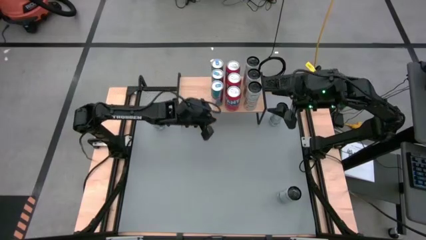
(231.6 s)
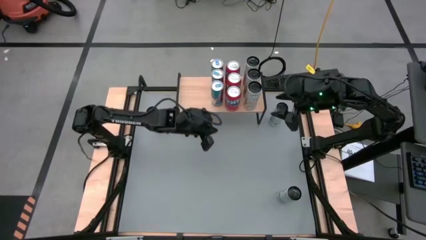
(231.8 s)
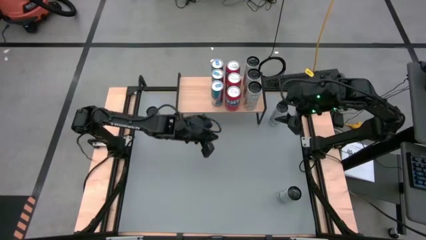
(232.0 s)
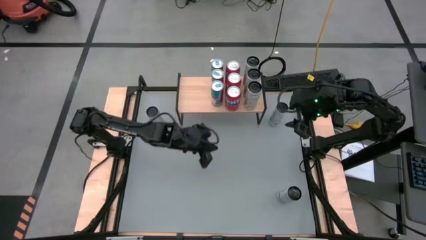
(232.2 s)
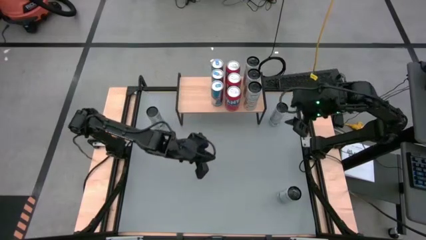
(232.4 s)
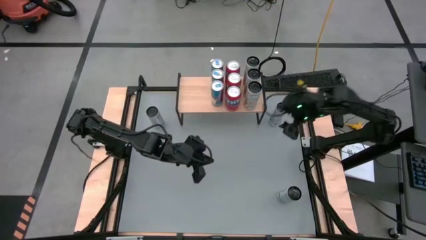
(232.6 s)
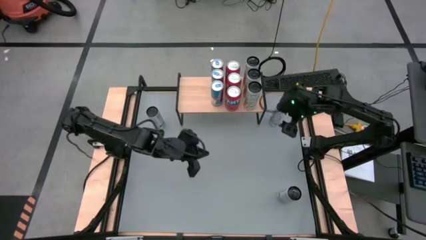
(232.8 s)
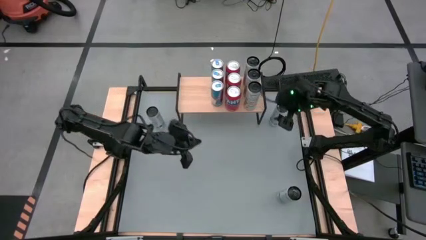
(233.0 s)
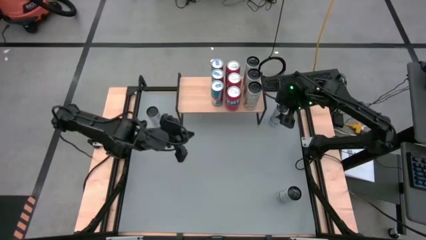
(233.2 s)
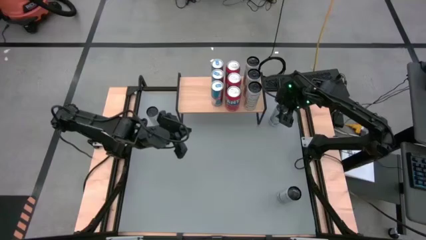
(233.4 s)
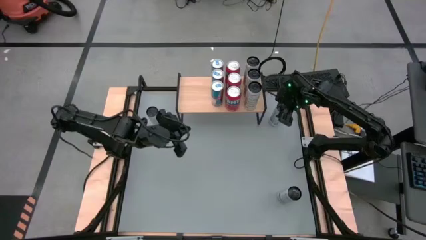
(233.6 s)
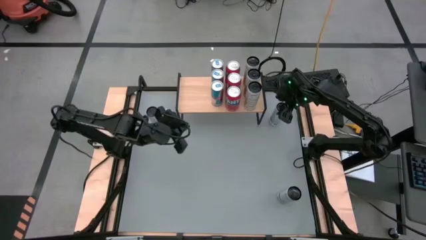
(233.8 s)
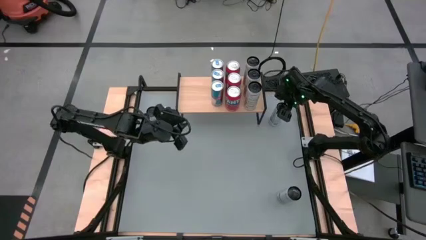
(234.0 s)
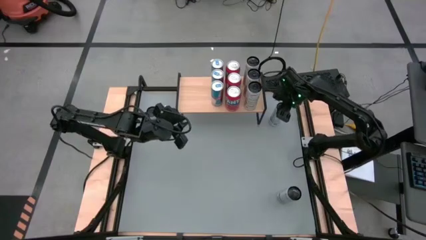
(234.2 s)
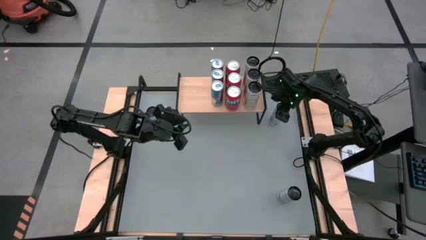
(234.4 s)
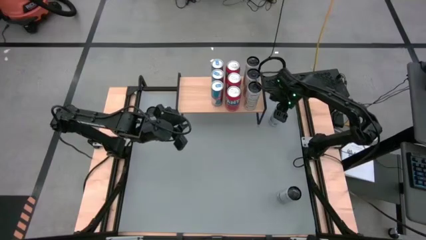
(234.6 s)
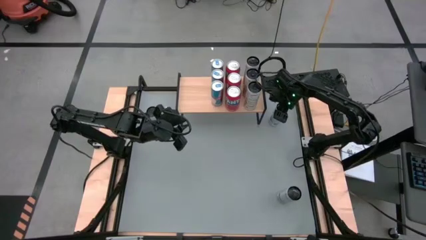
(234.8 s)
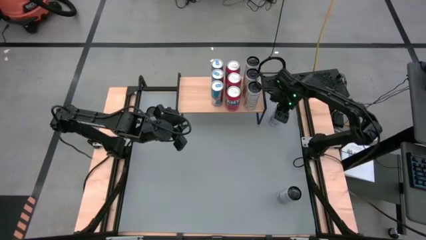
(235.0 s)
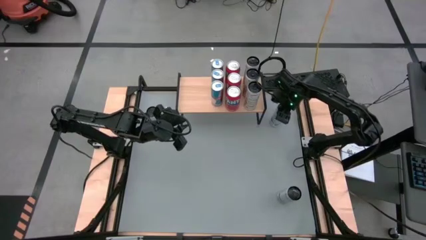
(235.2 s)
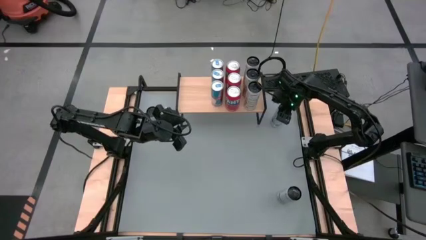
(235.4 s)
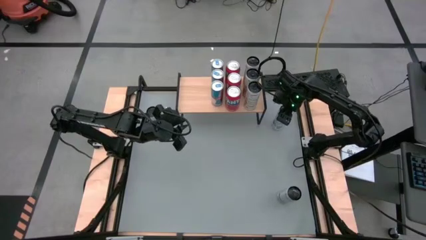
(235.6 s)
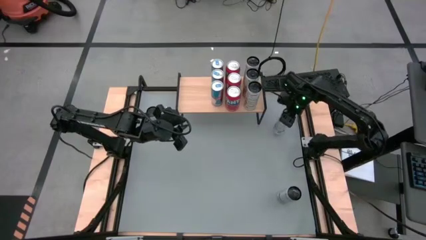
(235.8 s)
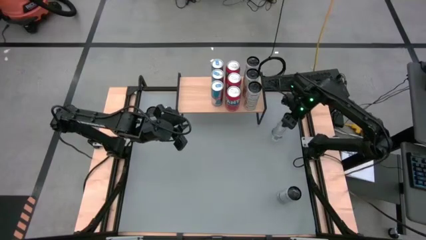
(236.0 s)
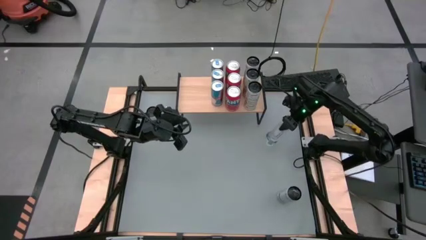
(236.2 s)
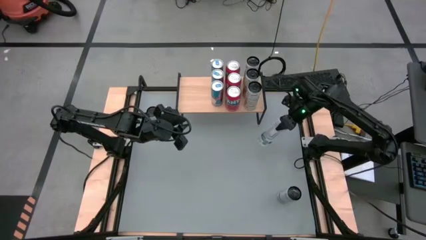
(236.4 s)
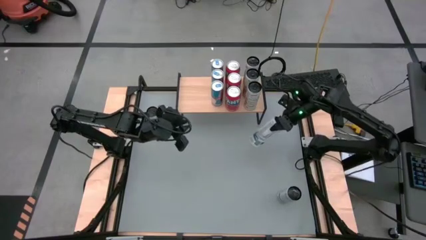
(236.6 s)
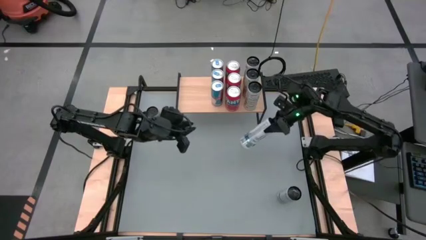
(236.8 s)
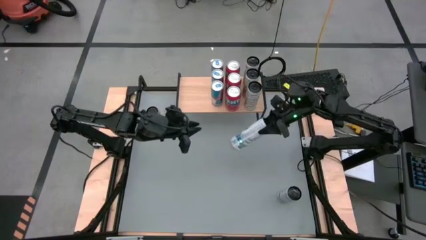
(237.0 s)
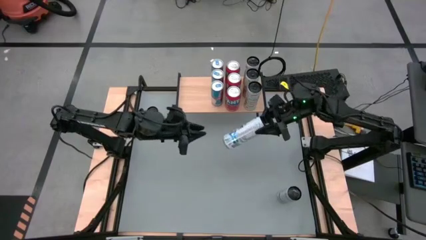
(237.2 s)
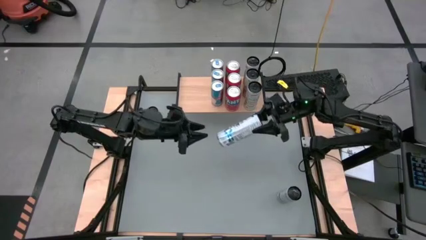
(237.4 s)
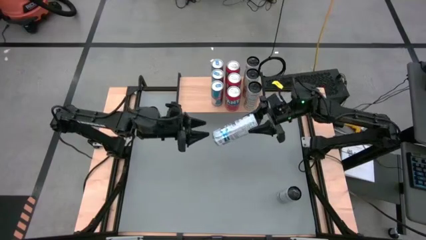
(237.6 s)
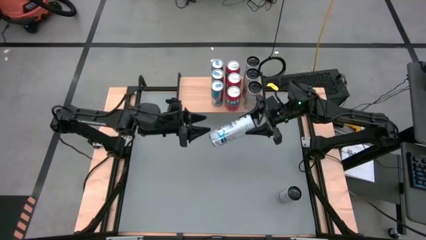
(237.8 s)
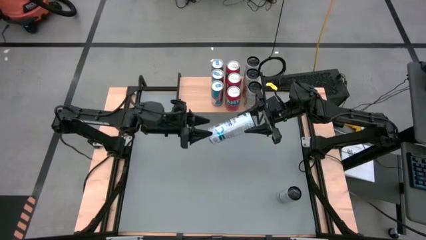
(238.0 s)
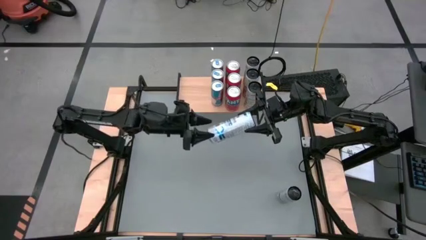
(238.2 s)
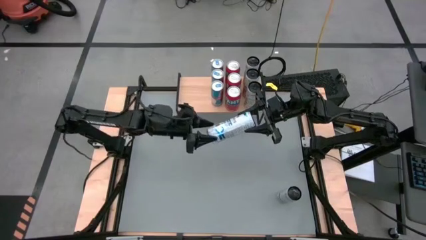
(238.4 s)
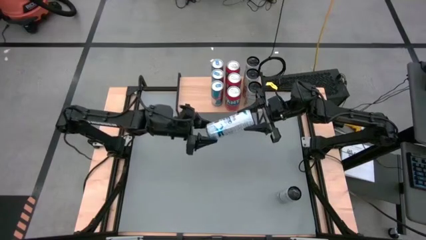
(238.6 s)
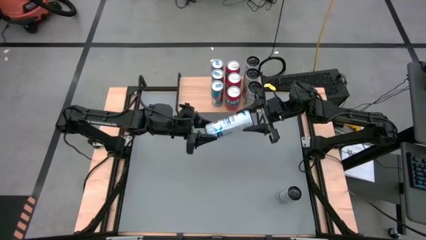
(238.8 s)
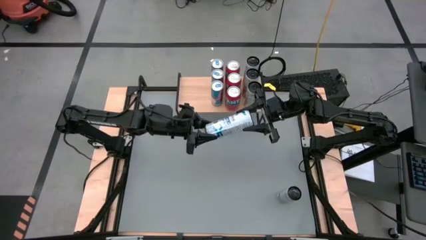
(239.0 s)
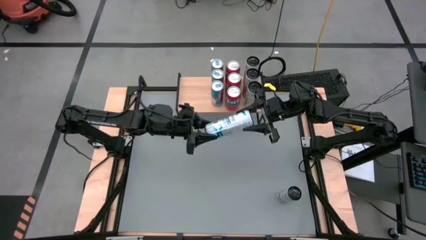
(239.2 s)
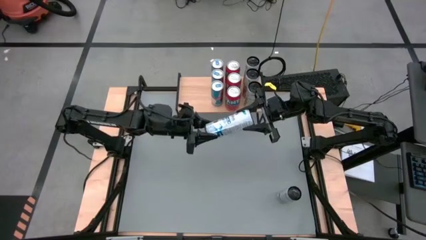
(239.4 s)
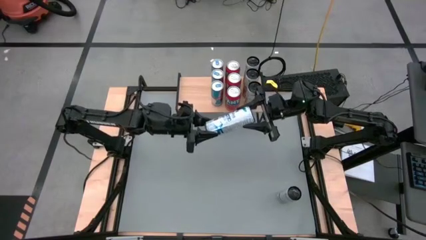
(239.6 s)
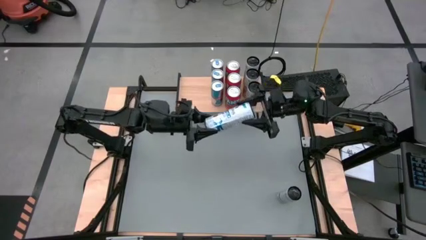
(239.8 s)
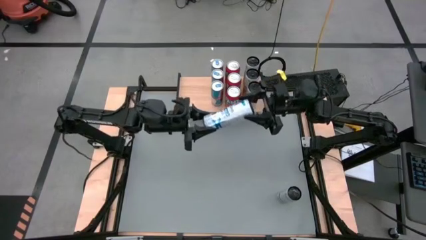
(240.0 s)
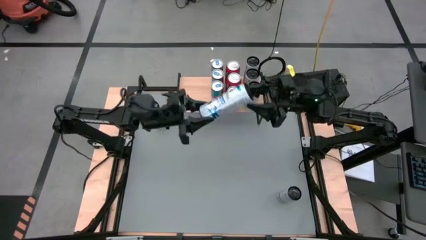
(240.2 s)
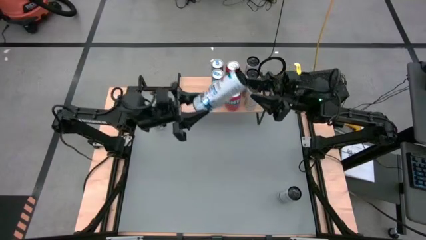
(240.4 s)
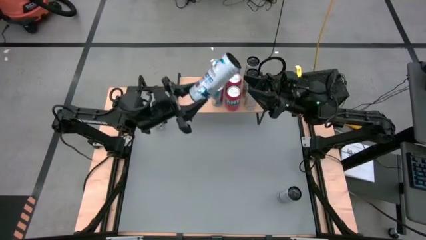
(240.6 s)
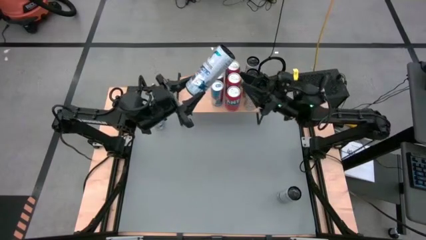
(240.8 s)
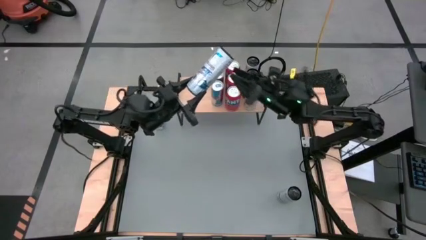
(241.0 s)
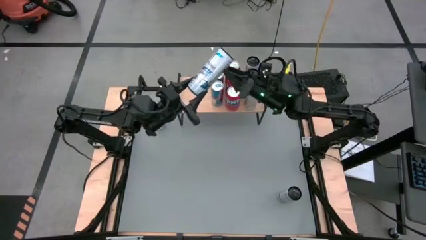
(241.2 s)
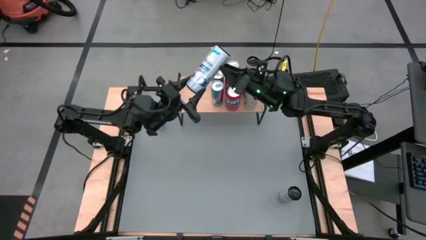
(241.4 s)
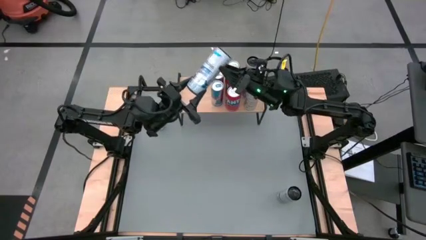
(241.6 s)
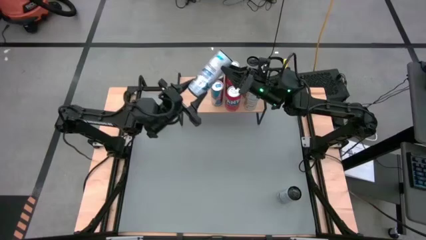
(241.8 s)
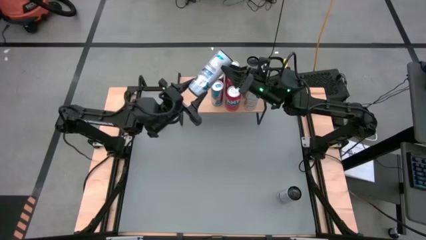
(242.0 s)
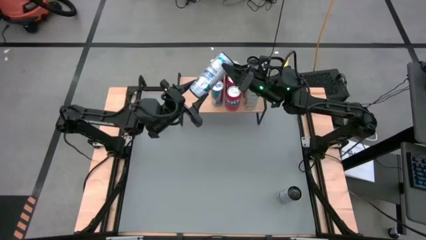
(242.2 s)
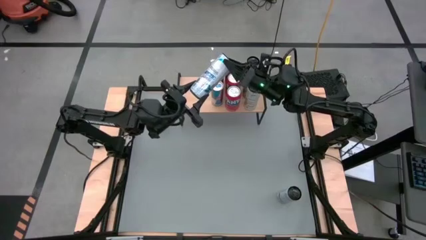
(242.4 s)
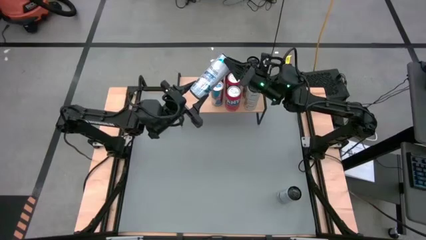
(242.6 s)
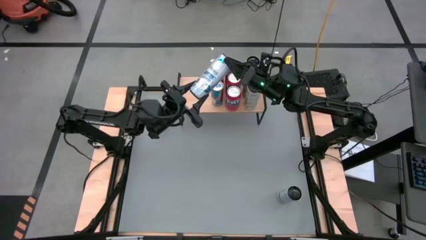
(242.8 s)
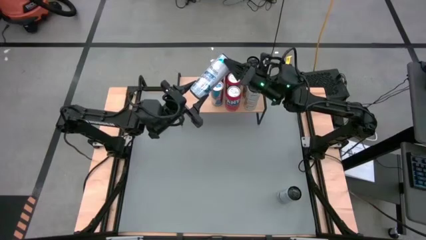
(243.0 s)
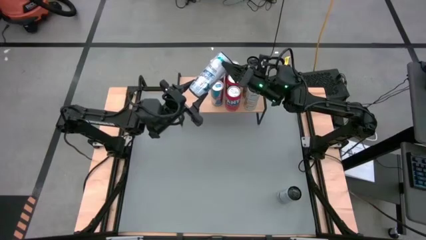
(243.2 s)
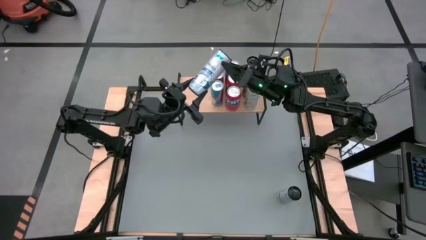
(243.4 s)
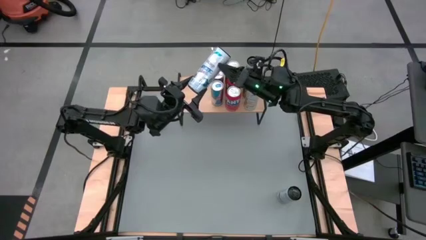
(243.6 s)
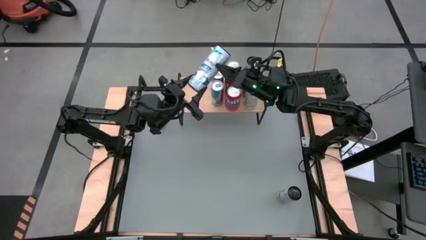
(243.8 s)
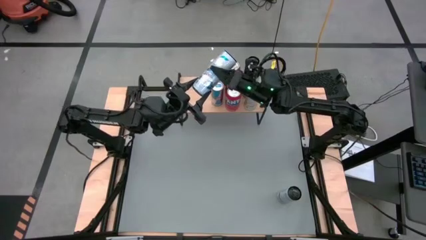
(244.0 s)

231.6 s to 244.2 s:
Task: Place canned beverage on shelf
Put the top right white soda can on the shelf

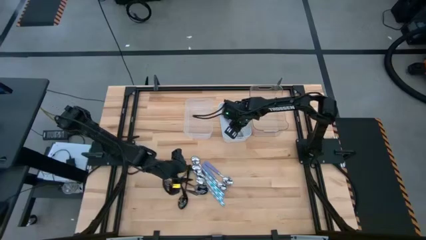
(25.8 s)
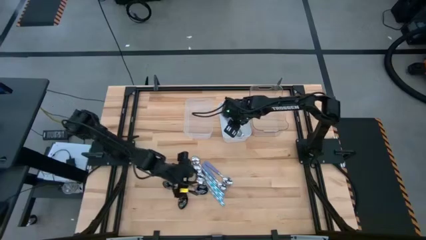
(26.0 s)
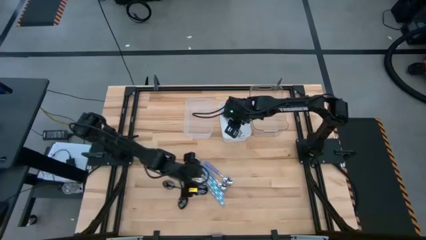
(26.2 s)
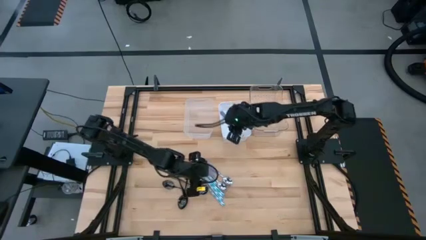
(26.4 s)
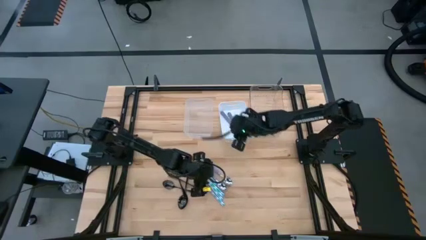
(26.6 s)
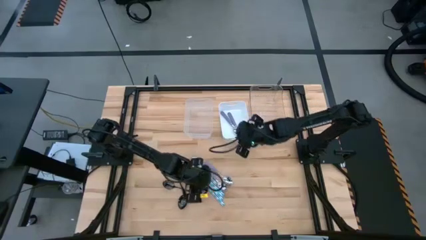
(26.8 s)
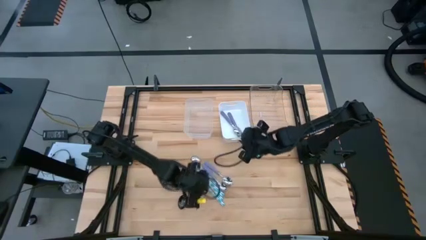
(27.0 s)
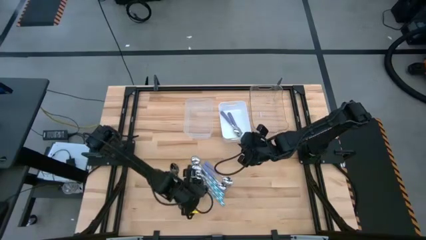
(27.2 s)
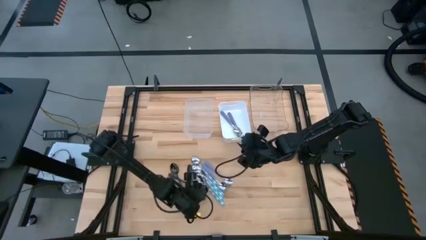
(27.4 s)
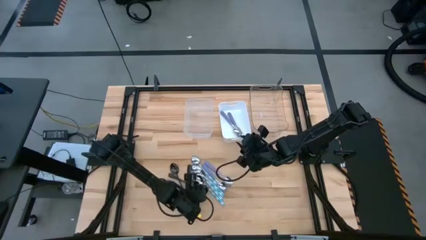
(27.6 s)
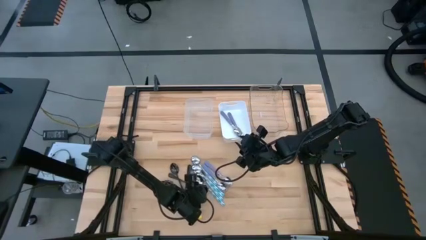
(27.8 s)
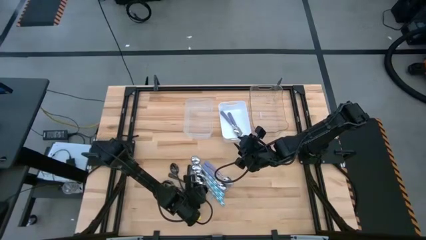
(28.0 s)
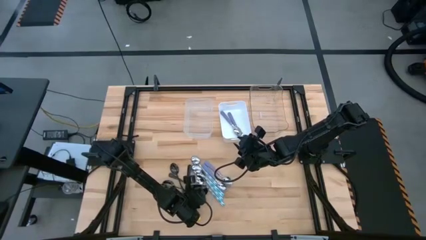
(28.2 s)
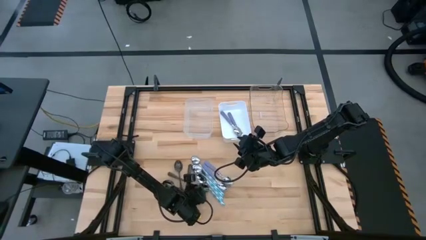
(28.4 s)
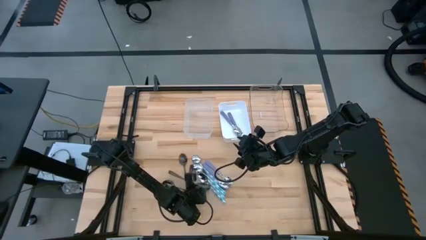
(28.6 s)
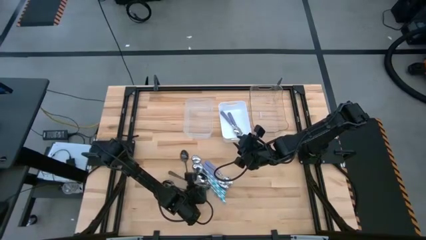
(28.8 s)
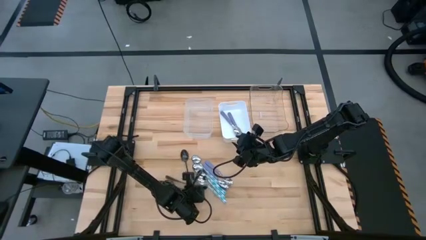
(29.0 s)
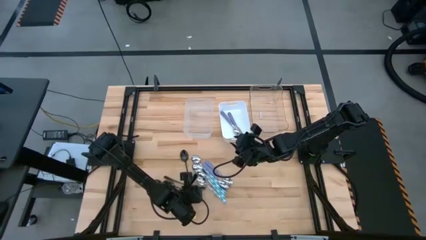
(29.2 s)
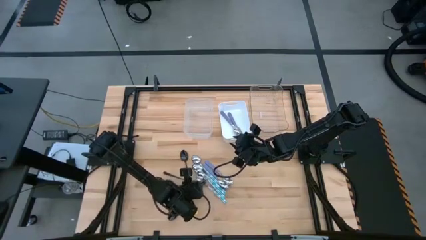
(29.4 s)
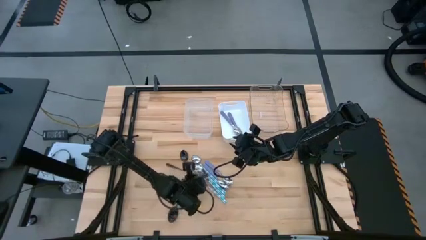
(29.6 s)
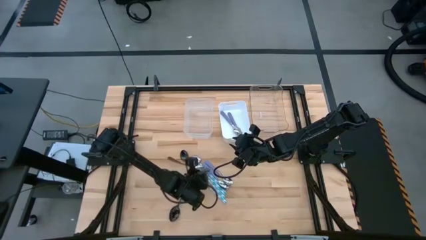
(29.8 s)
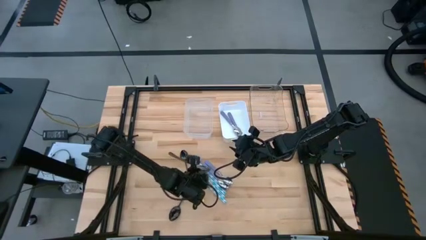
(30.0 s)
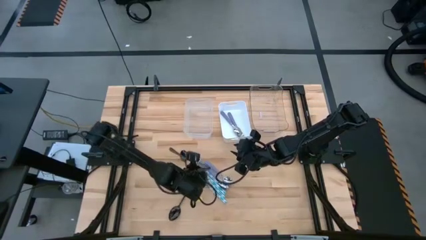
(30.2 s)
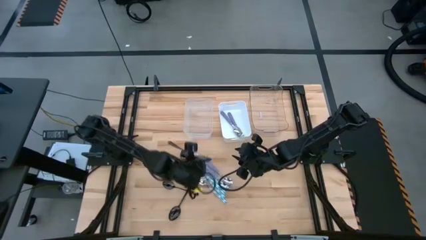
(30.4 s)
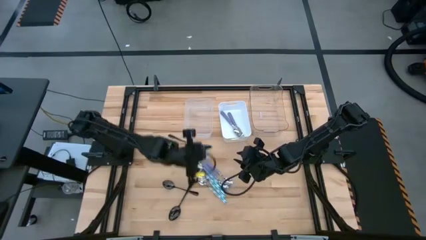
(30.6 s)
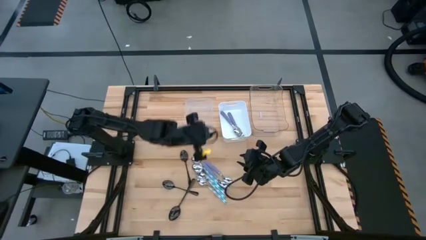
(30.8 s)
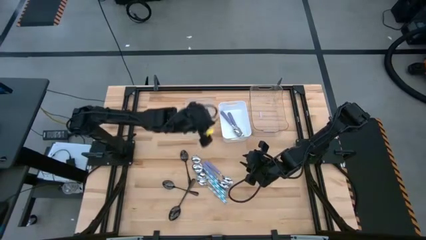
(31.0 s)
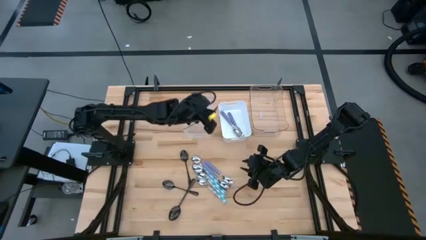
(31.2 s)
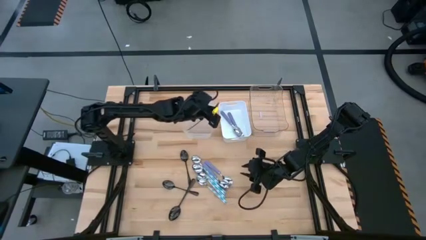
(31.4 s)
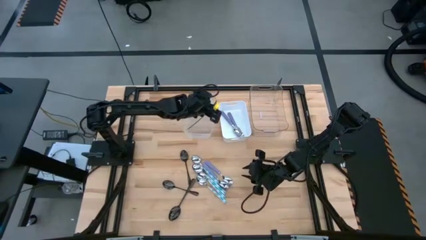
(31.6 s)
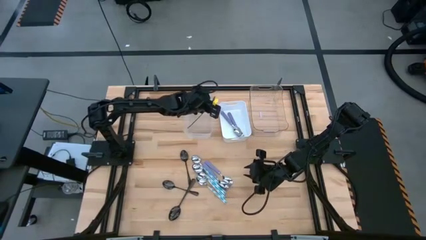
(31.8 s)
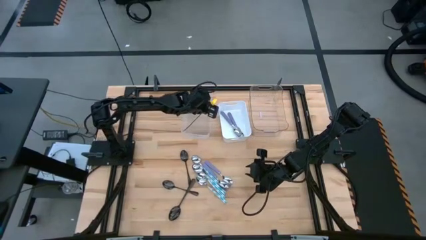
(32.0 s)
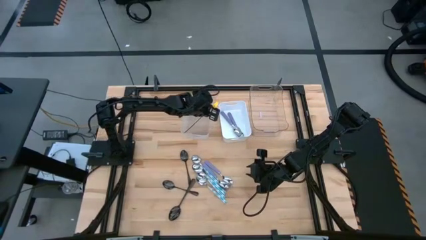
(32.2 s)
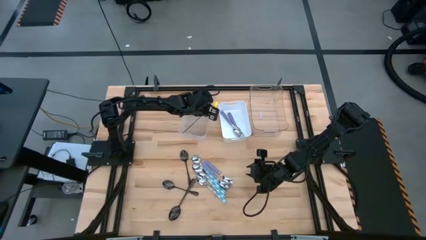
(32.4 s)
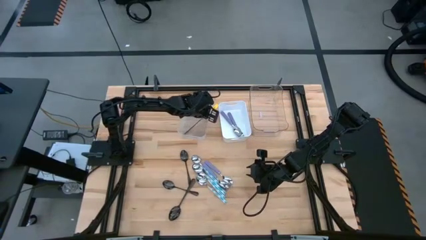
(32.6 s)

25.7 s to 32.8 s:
Task: Sort silverware by color (type)
Put the black spoon into the left transparent bin
